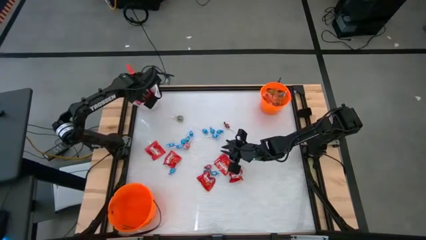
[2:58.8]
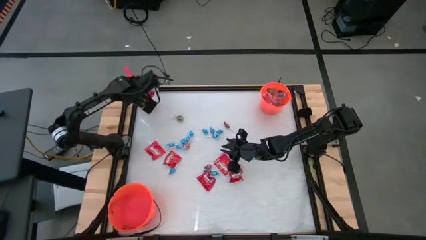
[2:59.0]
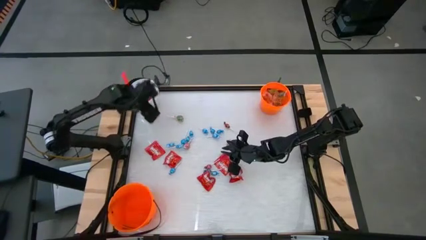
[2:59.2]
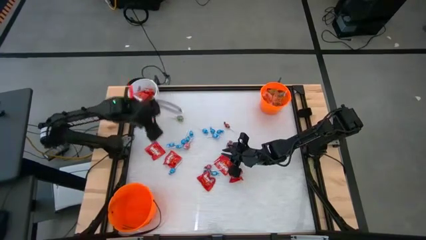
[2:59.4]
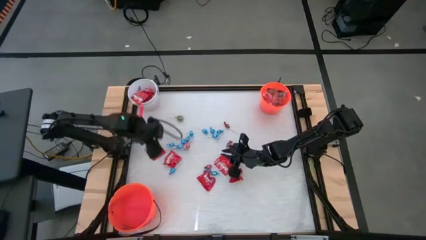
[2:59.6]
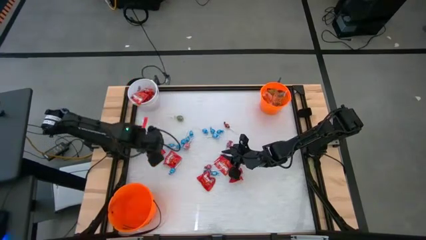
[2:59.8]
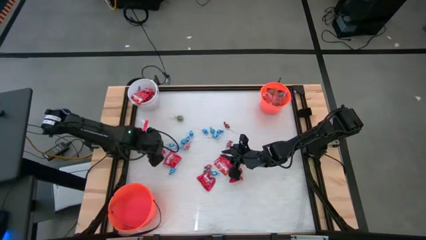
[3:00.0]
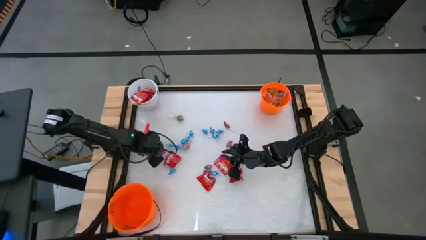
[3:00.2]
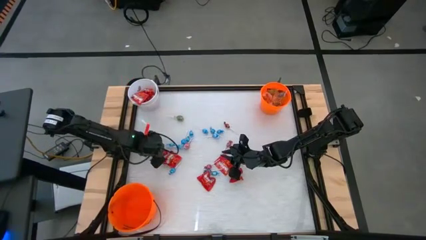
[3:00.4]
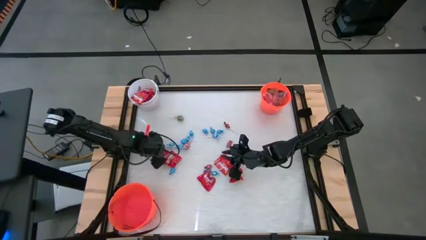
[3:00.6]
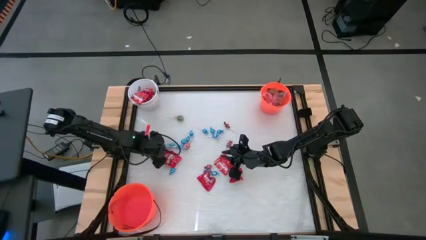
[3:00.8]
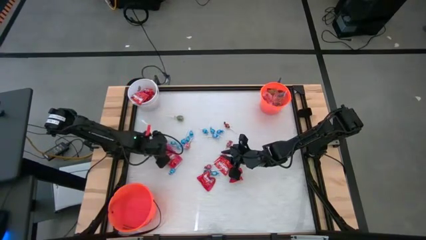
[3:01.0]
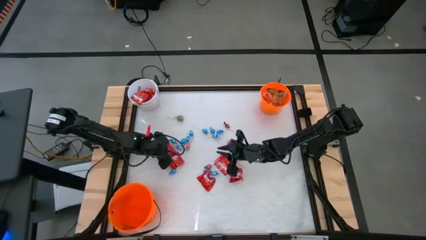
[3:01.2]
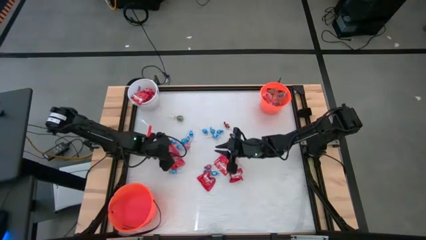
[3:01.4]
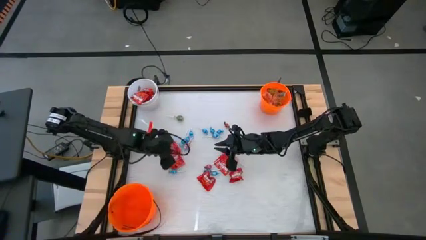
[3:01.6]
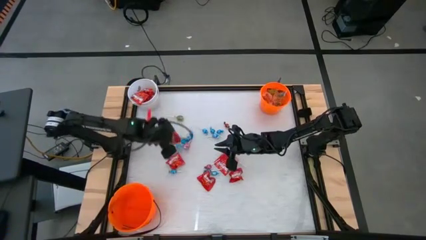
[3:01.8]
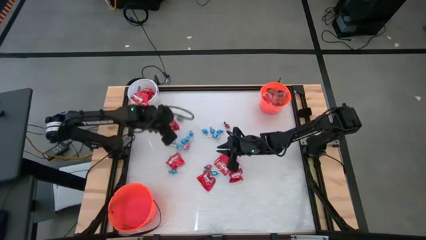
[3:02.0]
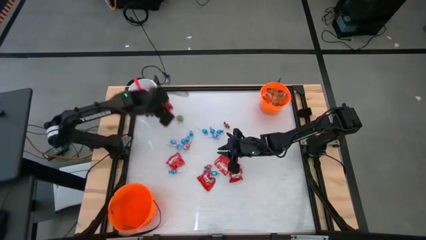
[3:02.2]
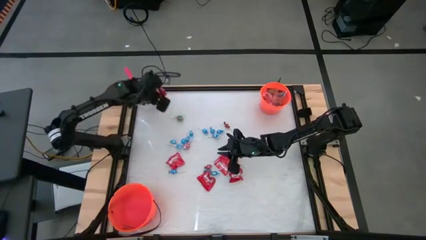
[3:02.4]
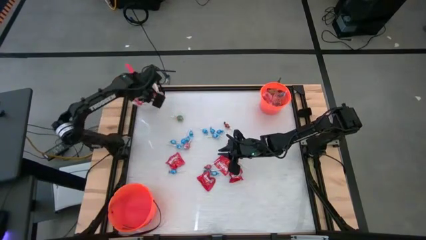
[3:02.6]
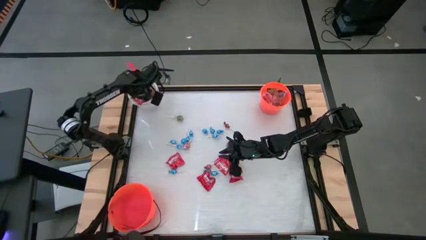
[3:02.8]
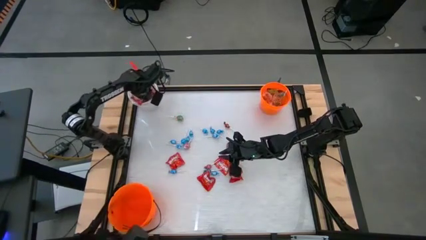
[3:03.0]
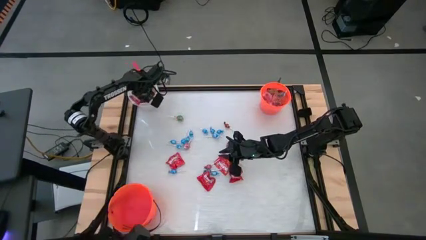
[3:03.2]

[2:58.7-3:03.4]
Task: Sort candy by brand, put in halloween buckets
Put the red candy pack into the white bucket

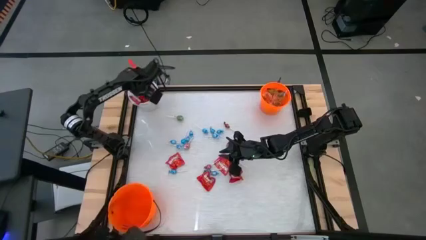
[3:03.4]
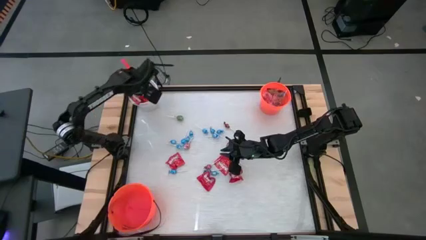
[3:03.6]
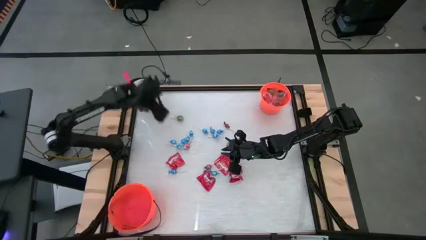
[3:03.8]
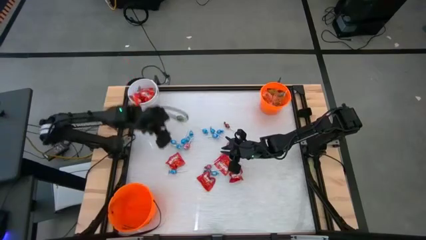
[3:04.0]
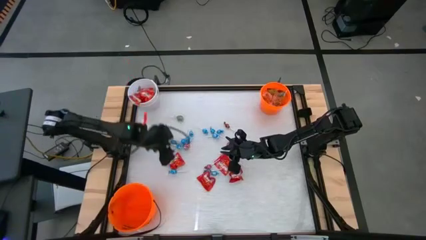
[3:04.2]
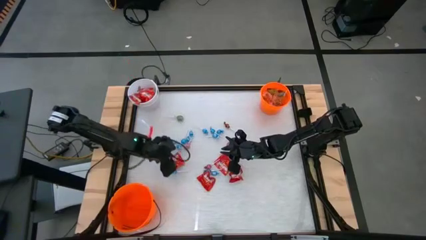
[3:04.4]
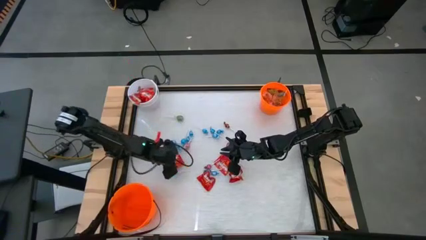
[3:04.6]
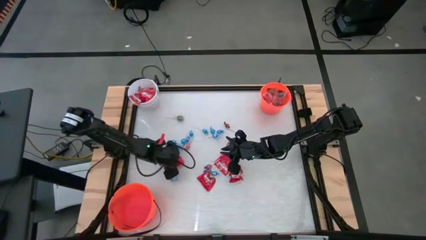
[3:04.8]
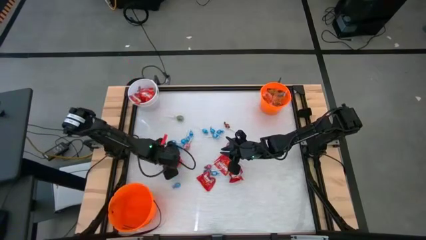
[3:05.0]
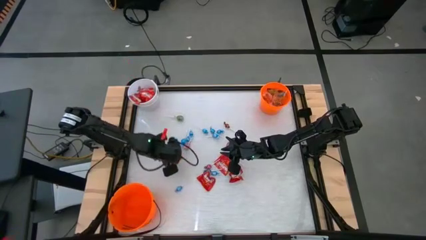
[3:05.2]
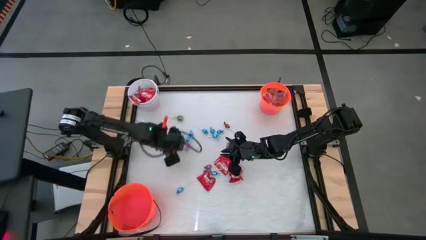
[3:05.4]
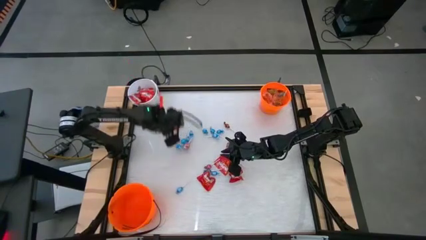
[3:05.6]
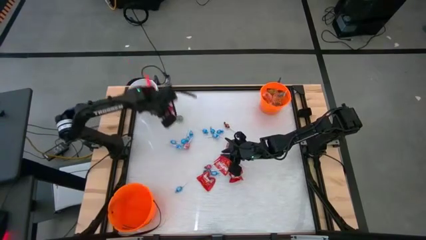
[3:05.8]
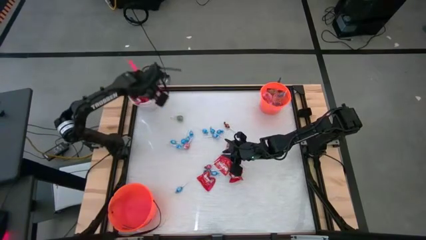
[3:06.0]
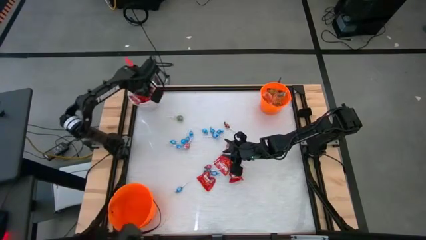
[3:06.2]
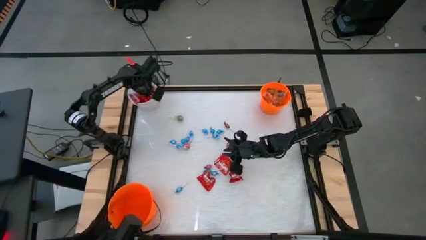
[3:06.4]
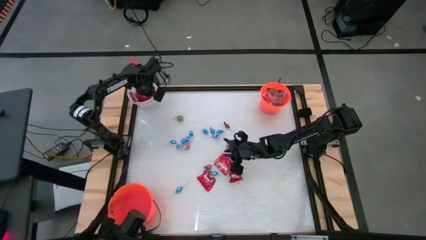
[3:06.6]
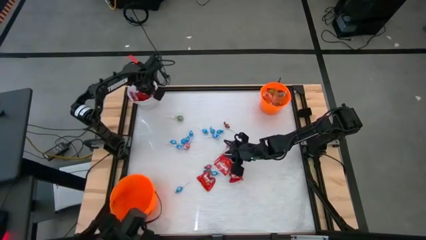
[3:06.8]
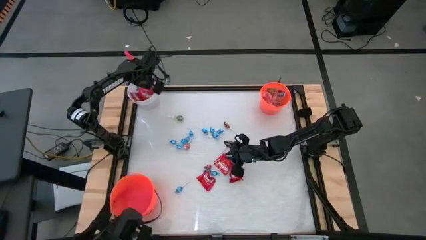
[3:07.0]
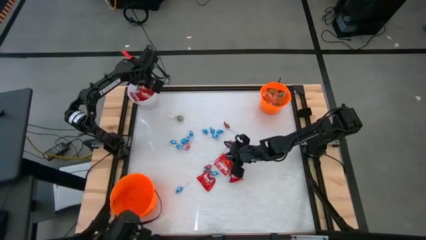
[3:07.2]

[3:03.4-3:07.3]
Put the red candy pack into the white bucket

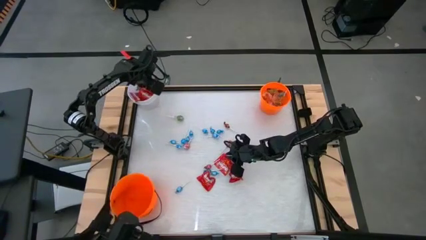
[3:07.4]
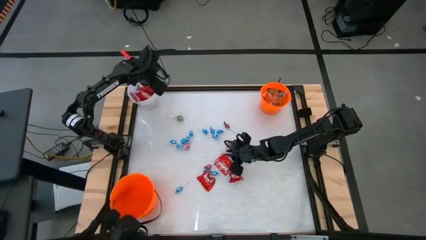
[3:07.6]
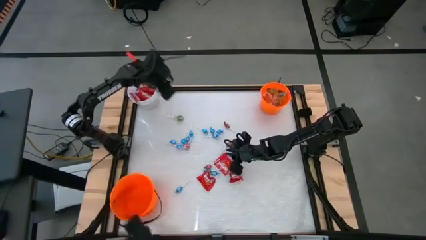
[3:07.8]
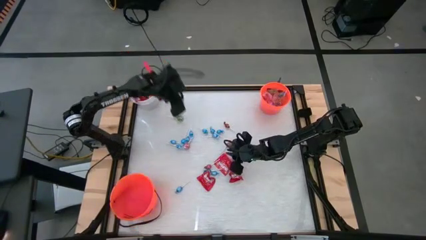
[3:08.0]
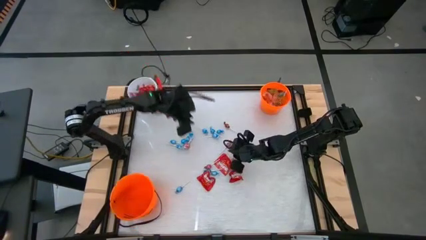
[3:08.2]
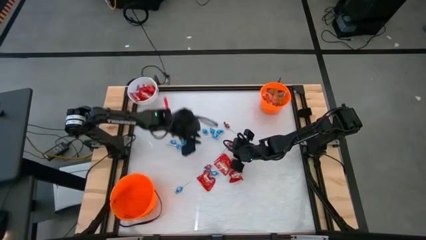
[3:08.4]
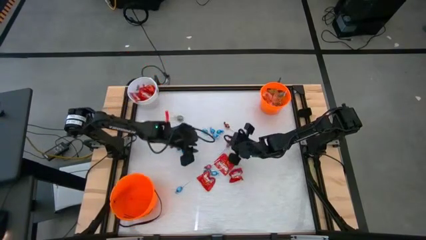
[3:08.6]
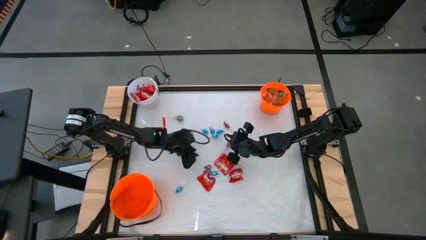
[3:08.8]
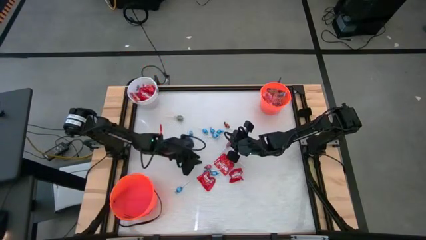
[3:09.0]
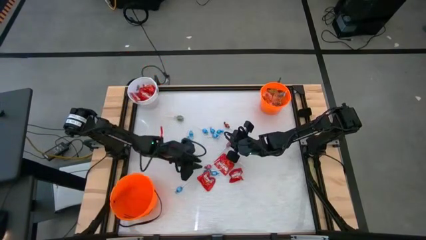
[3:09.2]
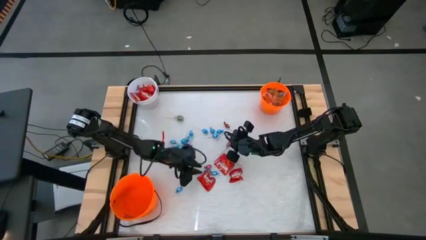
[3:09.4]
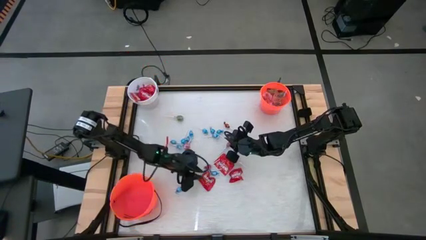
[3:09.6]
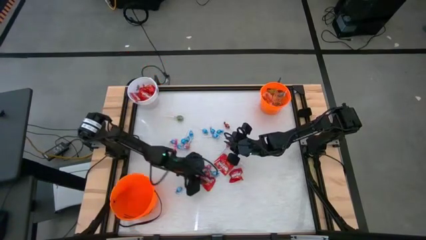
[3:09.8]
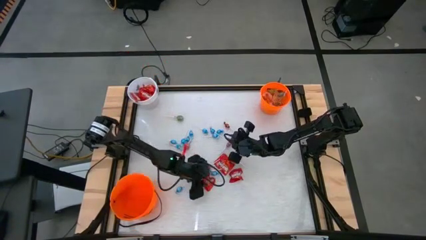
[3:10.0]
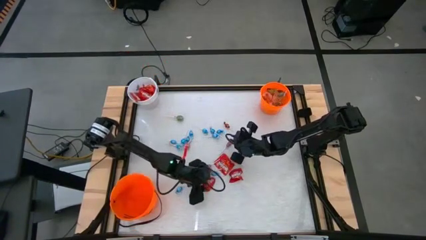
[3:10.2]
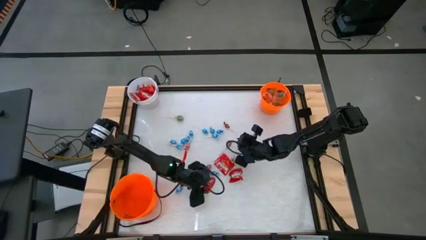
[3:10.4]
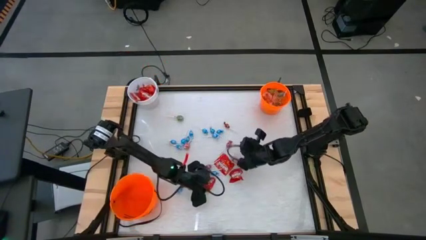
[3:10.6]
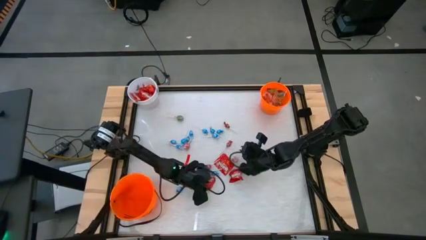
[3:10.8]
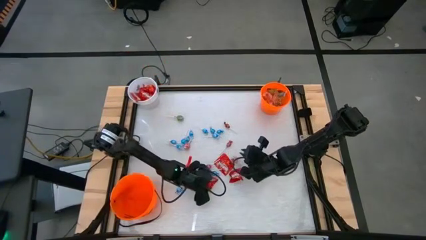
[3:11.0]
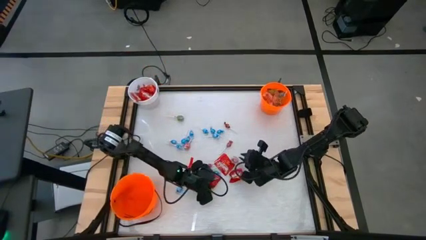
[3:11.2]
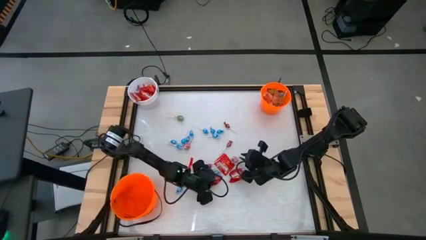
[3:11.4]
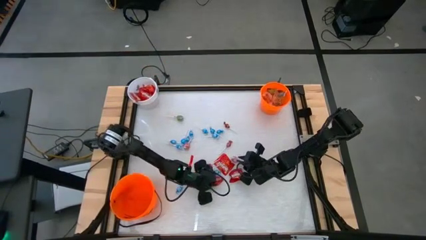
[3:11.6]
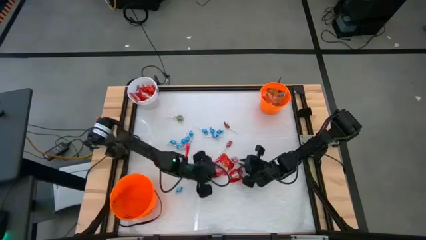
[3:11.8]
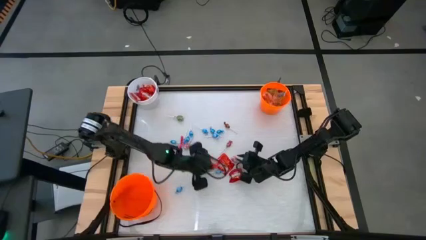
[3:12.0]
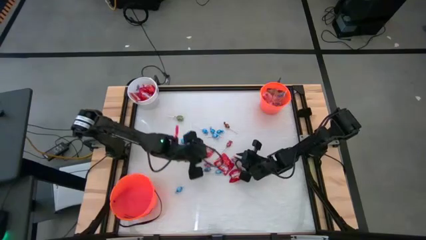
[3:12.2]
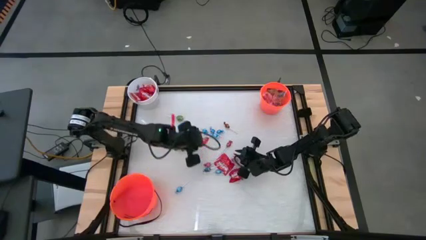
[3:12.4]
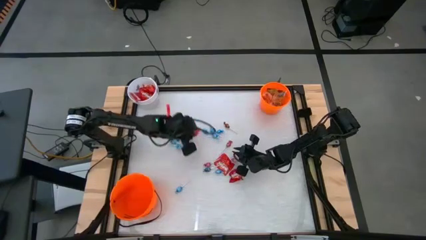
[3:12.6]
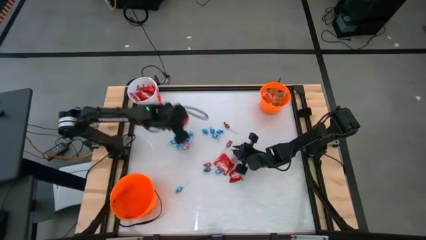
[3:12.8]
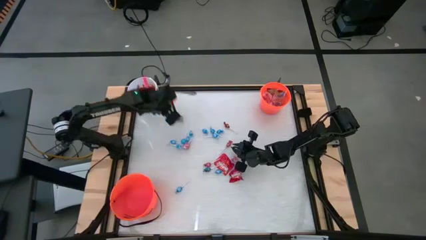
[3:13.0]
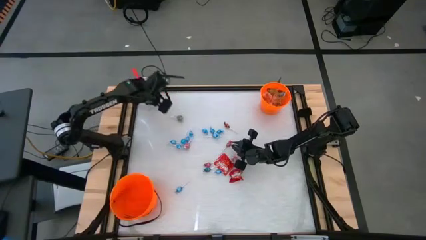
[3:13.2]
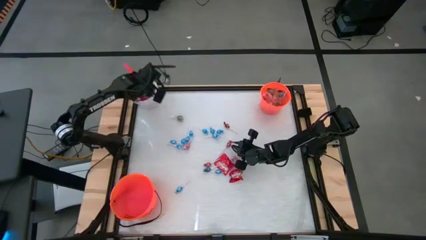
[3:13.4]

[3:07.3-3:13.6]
Put the bottom left red candy pack into the white bucket

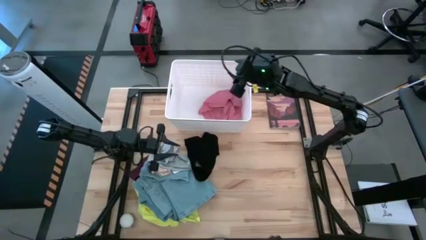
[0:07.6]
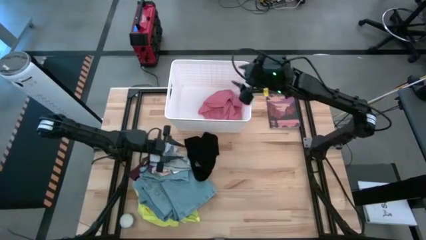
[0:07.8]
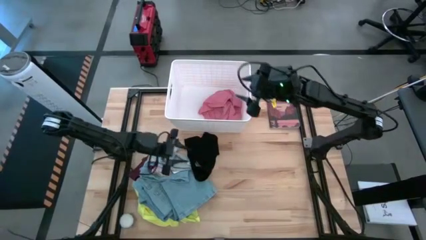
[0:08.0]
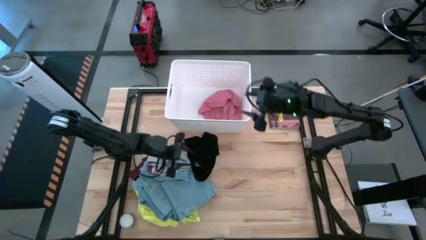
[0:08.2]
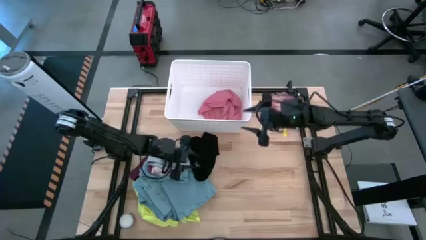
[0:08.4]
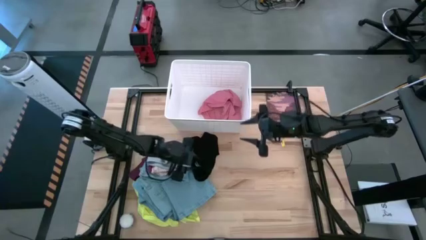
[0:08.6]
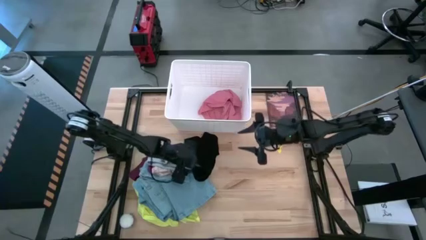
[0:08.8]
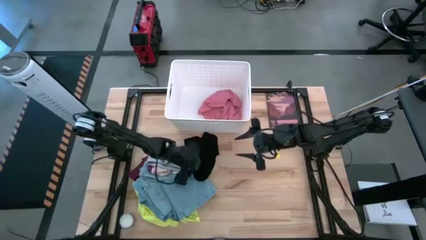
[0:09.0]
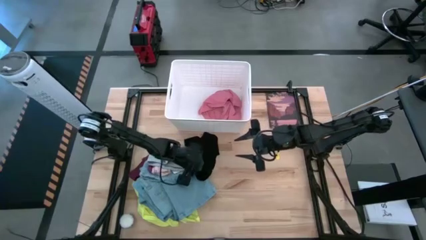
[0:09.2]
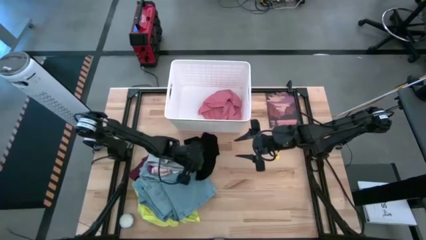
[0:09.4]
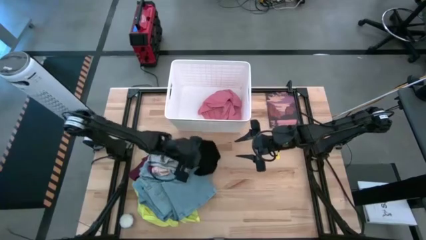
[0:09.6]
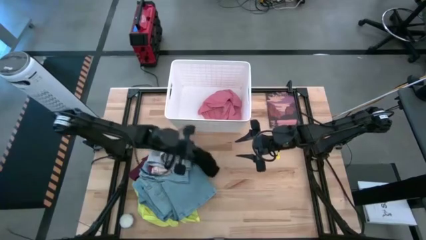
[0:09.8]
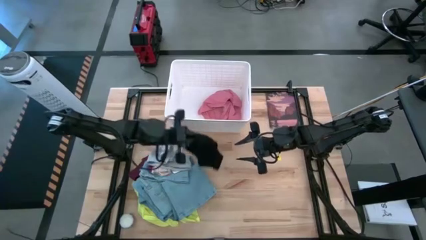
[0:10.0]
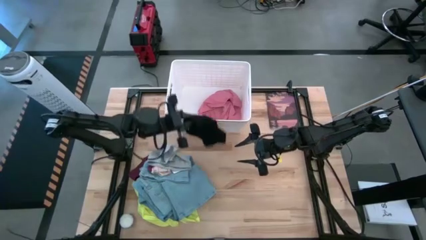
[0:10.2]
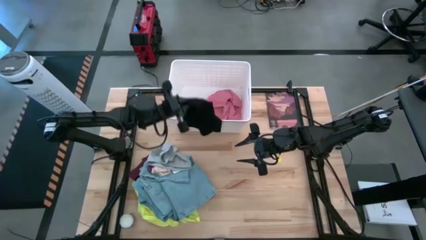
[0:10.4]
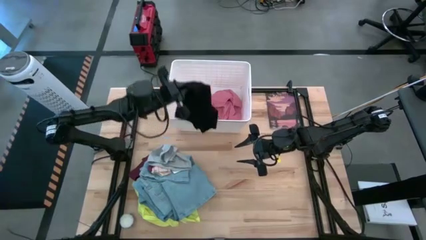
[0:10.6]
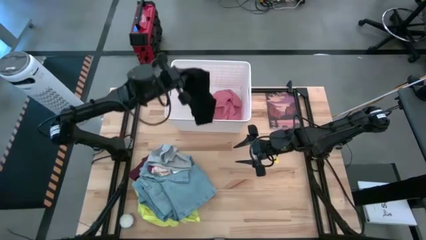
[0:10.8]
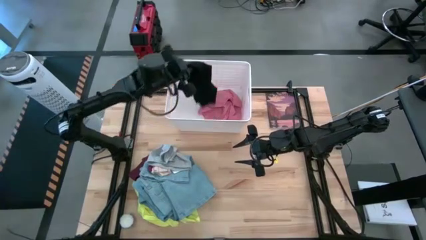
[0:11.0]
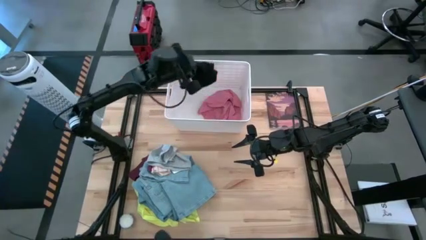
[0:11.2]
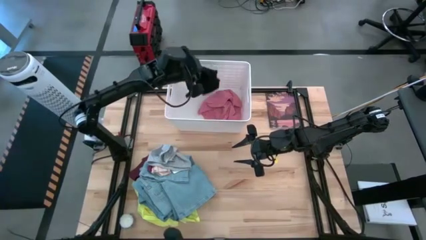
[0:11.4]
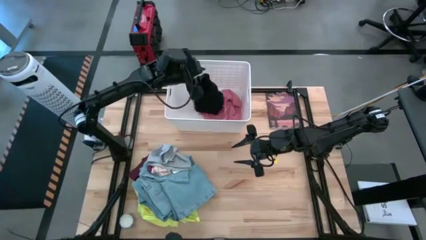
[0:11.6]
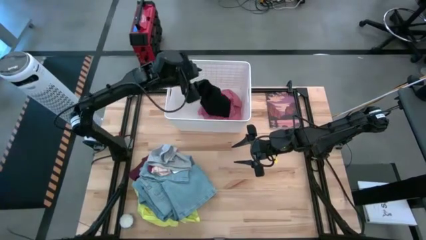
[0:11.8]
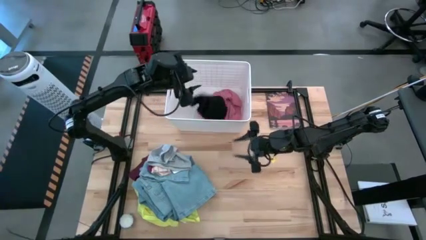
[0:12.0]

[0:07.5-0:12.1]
Task: Sort clothes
Put the black underwear into the white laundry bin
